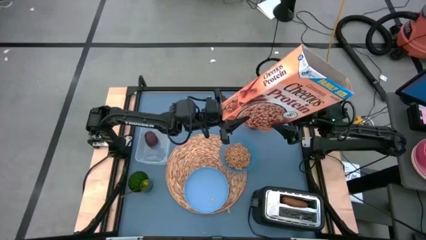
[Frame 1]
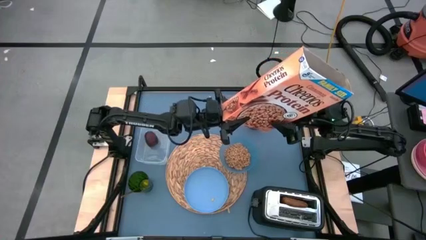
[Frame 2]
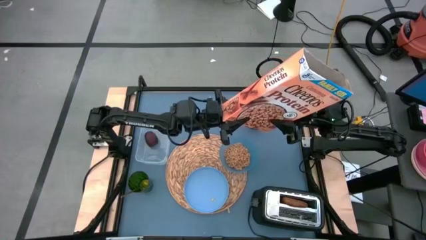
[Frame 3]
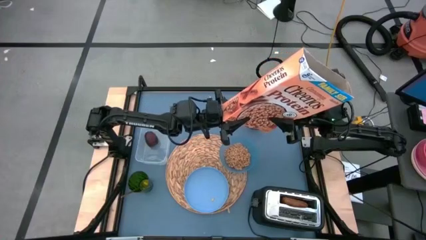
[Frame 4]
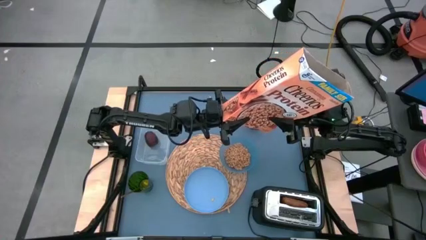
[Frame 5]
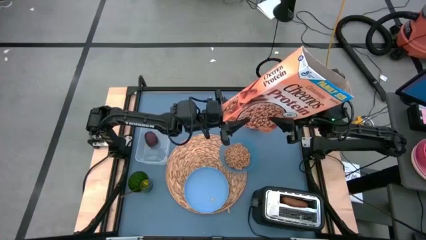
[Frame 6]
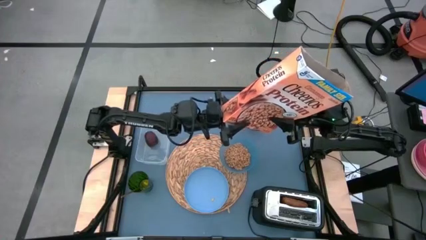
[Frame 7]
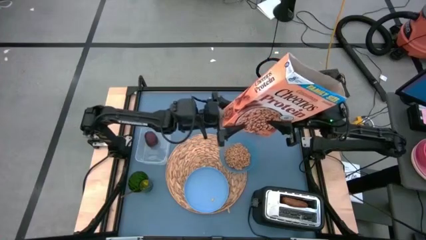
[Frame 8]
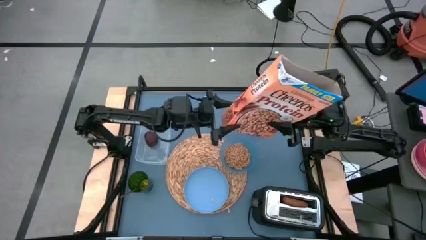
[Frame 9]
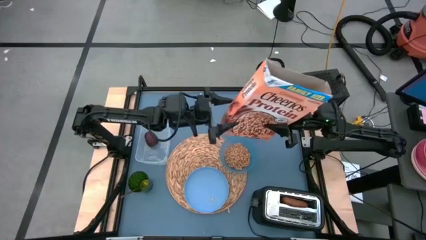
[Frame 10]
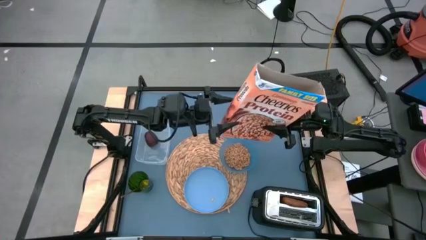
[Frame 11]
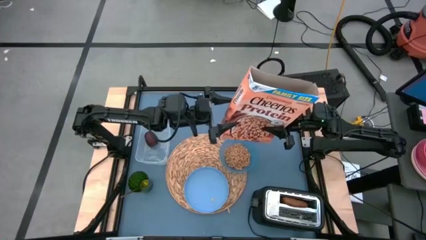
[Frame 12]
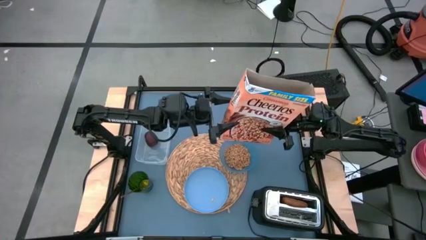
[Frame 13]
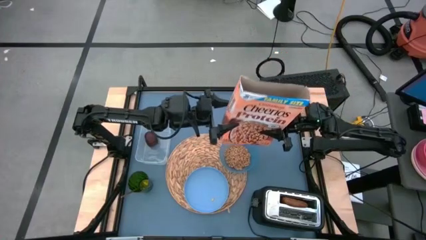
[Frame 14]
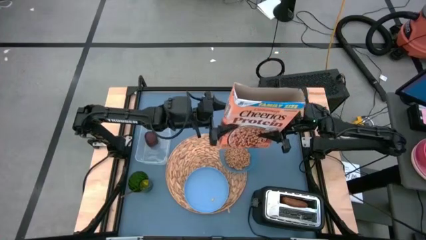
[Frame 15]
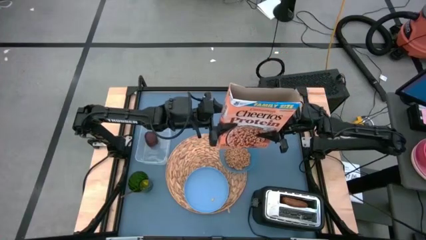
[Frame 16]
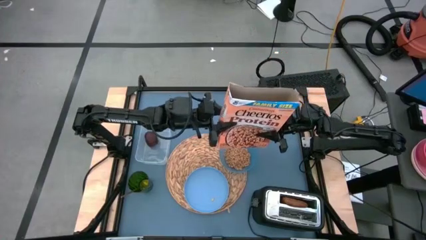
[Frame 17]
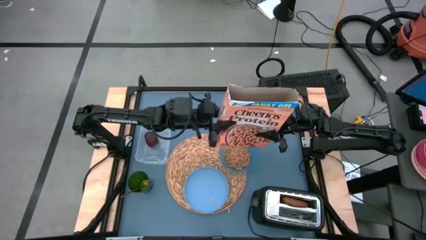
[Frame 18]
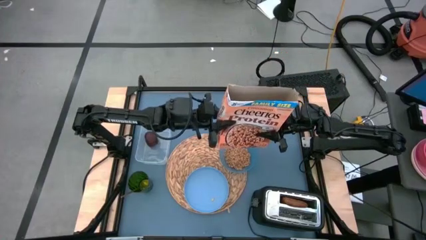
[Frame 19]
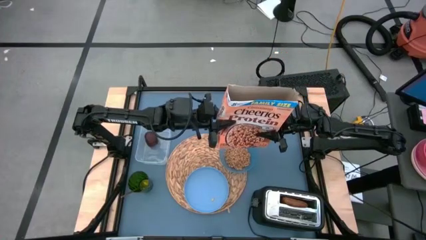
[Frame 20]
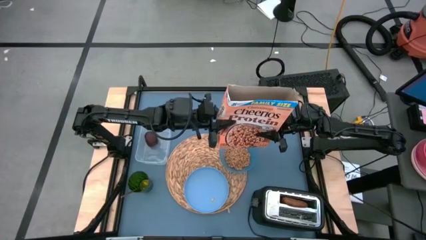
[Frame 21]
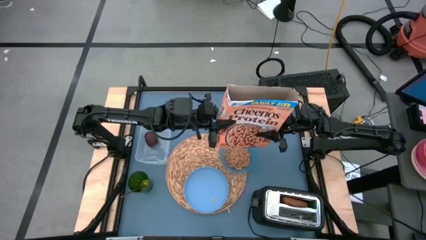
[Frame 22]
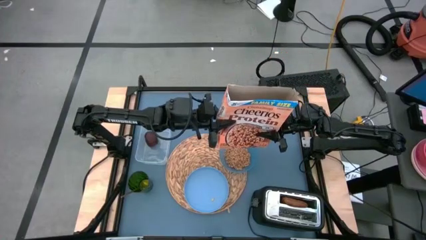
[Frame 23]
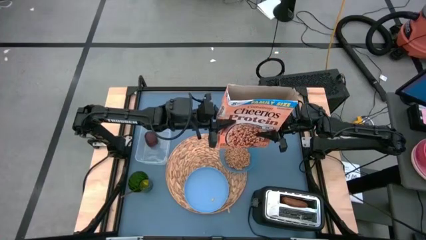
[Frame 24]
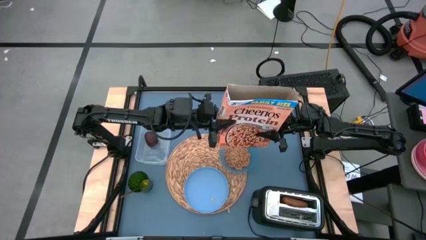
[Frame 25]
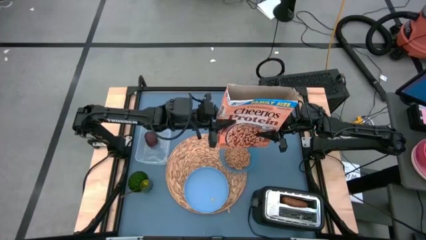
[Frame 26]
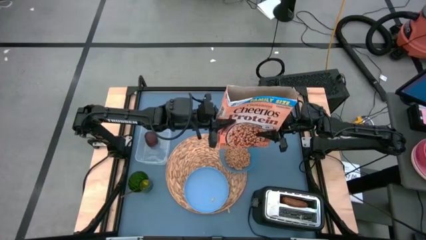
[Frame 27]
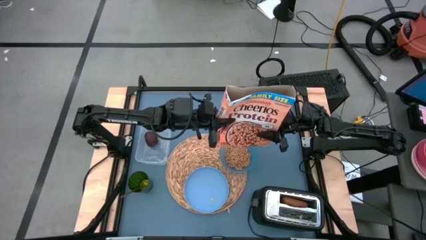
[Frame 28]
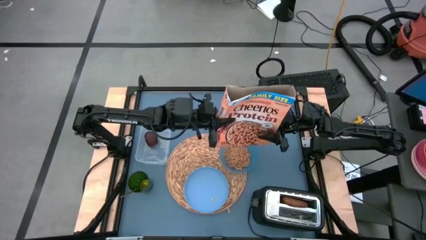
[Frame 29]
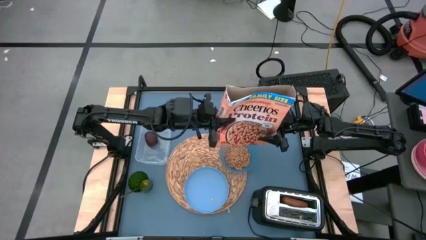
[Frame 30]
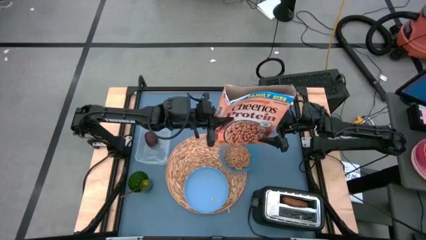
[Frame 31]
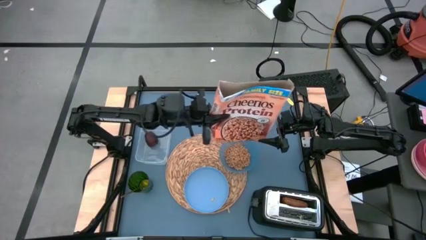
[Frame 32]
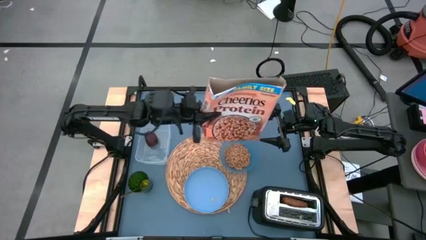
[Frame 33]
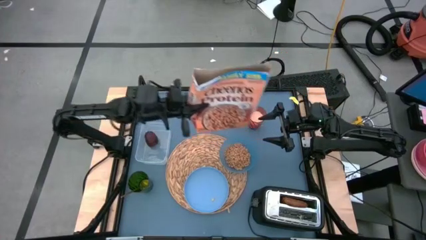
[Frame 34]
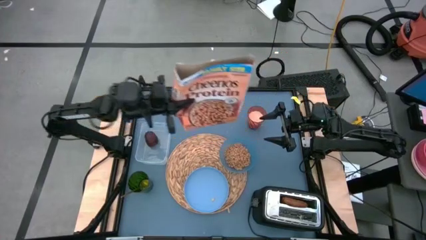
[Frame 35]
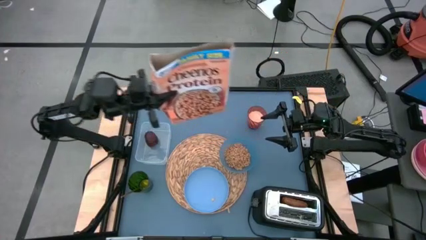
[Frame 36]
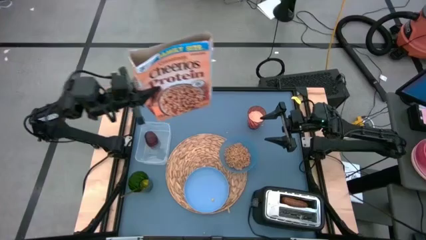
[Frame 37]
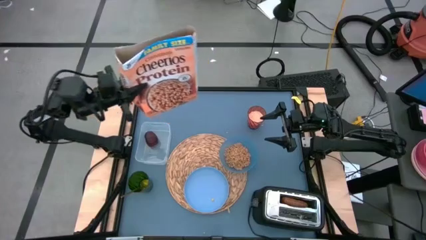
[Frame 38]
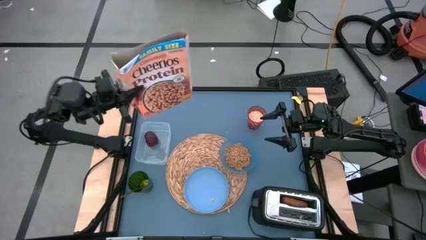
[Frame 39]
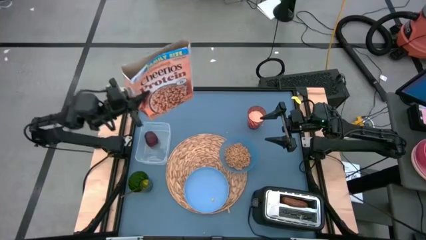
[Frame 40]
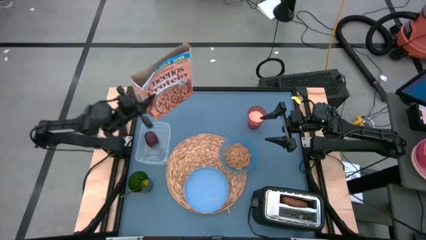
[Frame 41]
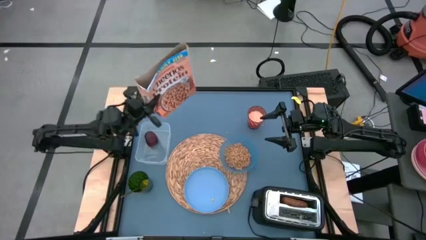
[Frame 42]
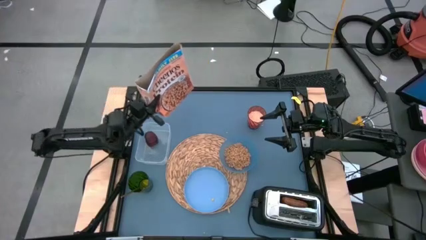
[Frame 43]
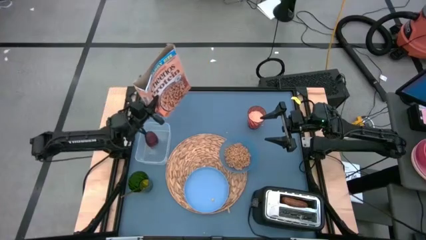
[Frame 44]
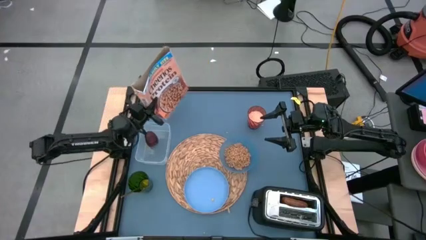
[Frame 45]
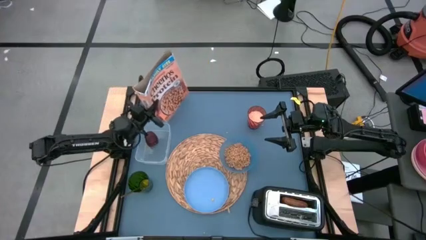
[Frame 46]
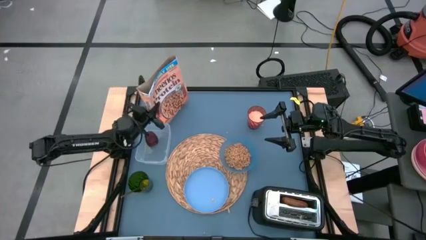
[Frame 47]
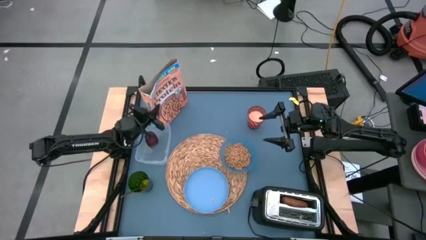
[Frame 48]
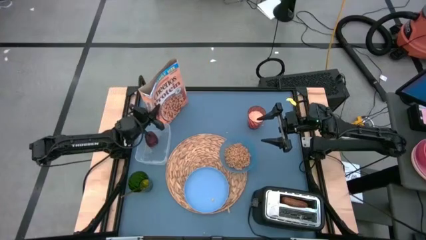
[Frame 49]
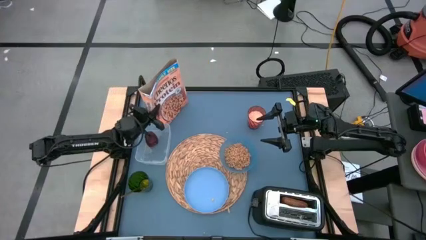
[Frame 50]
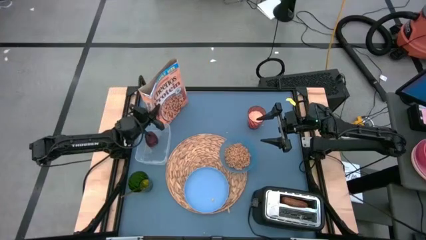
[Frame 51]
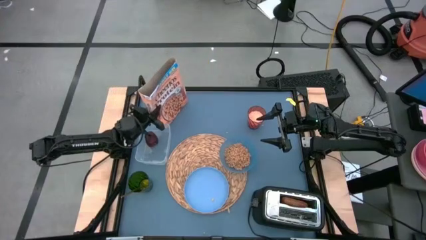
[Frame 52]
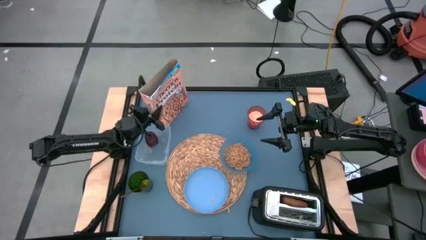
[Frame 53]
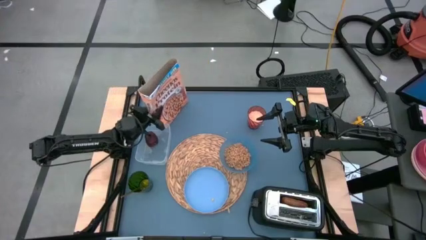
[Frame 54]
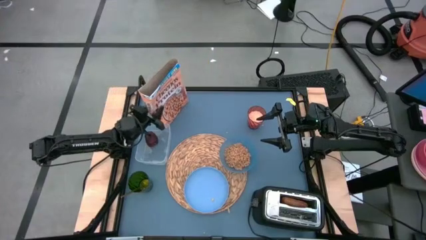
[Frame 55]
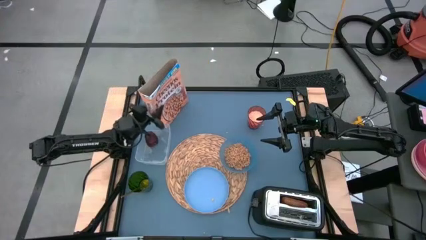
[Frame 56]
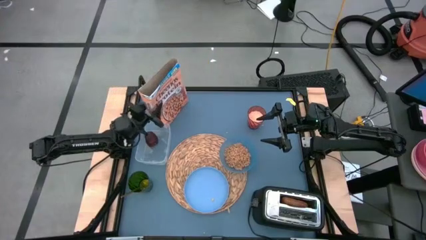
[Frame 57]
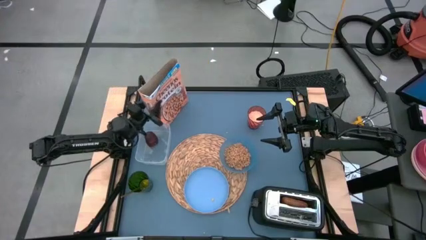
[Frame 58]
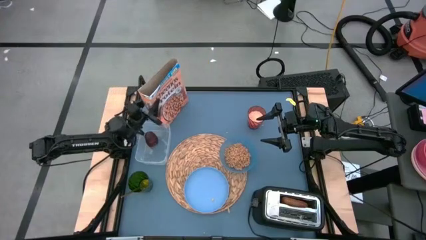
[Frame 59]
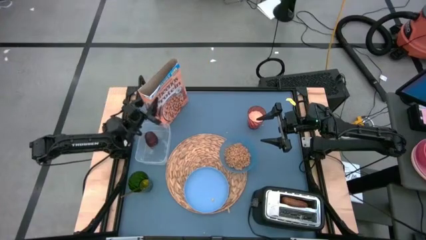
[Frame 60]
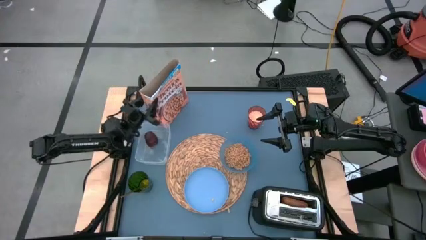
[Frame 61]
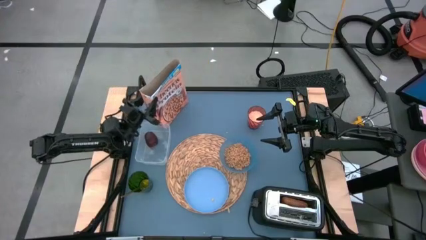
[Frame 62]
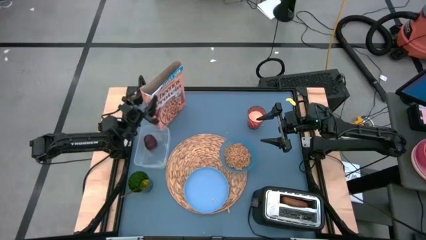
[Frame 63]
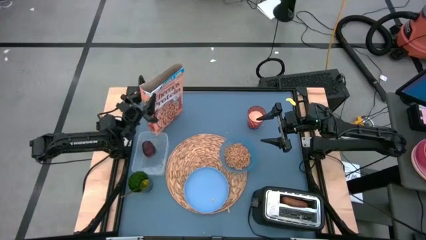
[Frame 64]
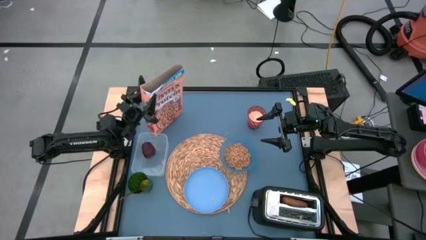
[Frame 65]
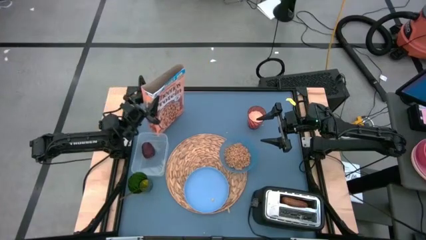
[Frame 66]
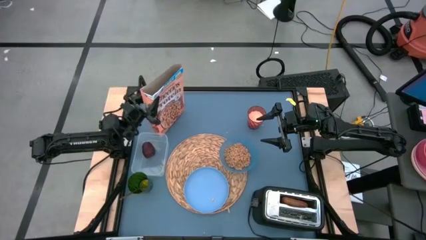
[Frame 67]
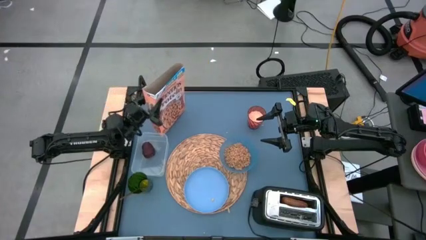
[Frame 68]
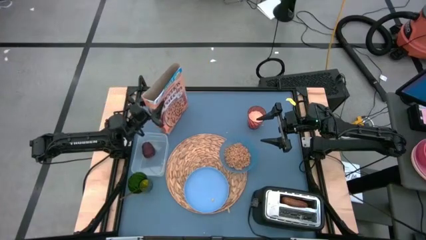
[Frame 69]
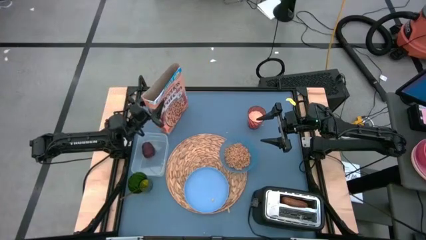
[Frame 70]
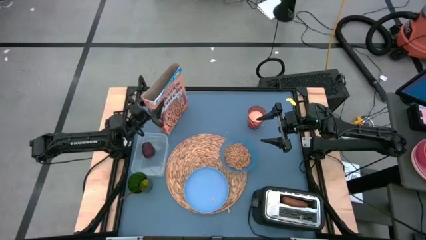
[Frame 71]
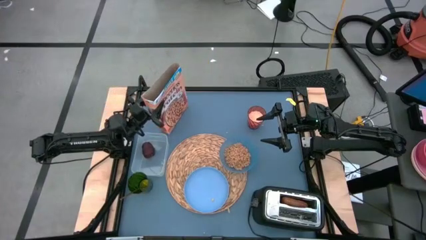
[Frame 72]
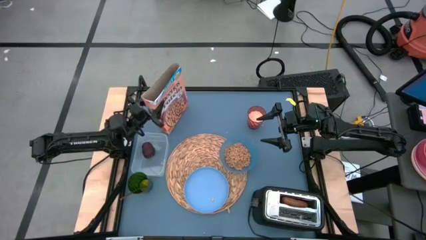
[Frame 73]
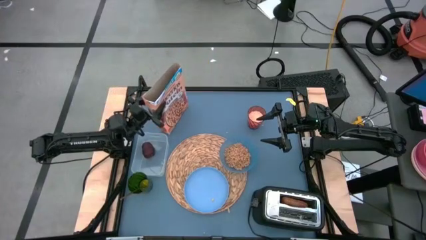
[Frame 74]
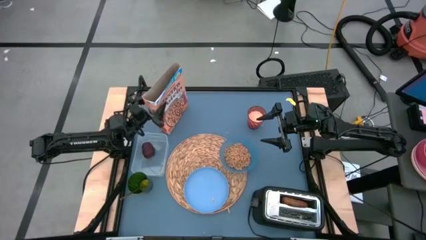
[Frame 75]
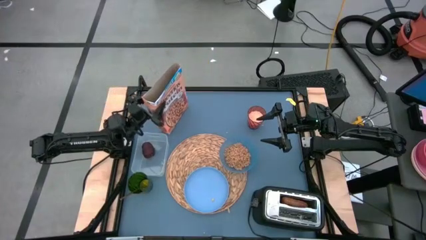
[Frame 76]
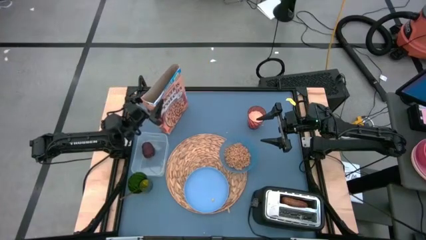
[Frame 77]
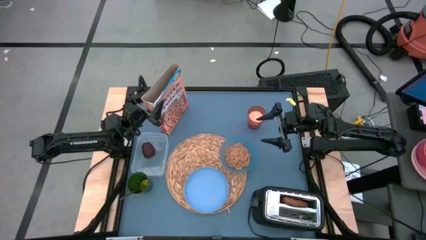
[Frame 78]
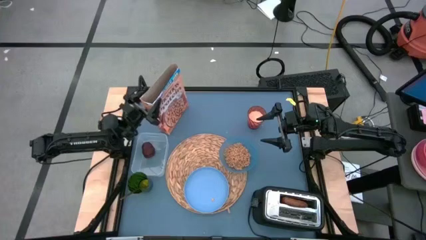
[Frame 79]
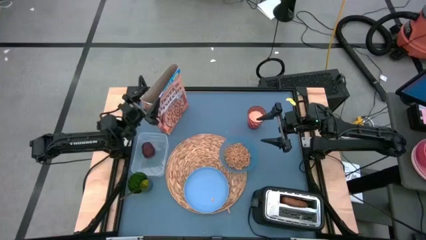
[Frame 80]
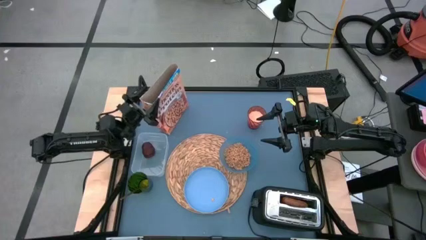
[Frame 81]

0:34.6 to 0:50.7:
Task: Arrange a breakfast setting
Pour the cereal into the blue bowl
